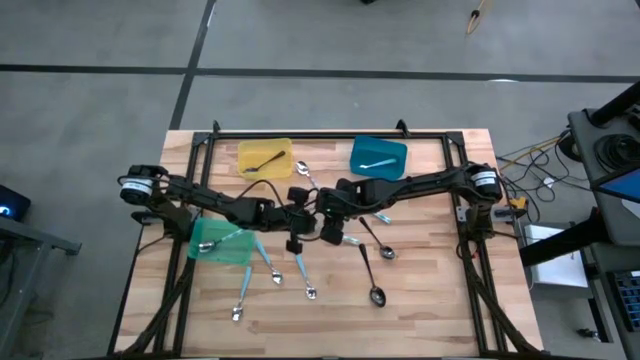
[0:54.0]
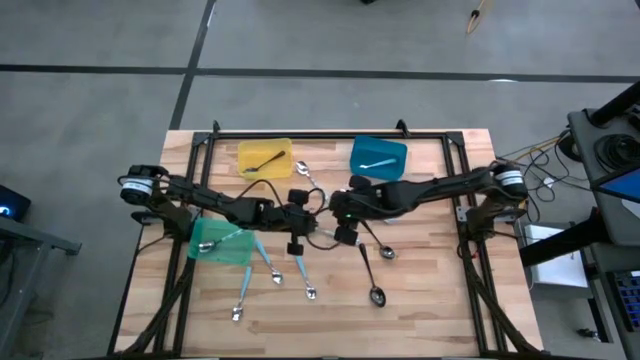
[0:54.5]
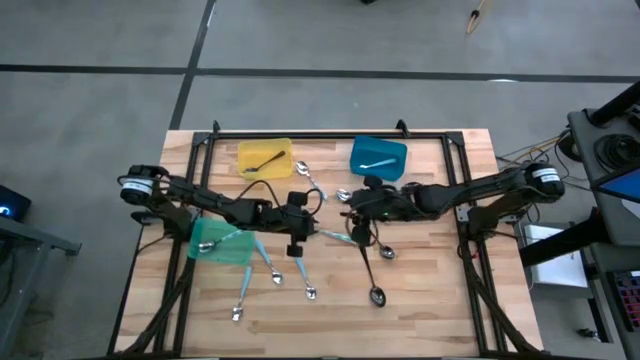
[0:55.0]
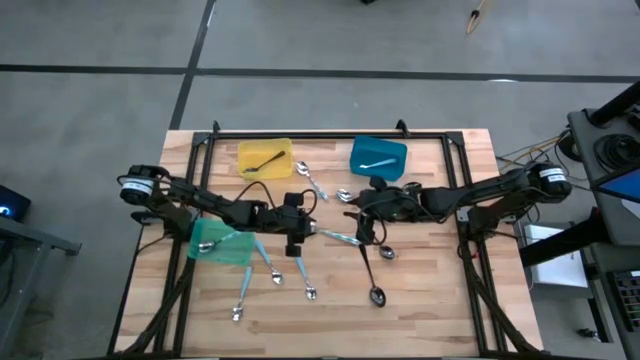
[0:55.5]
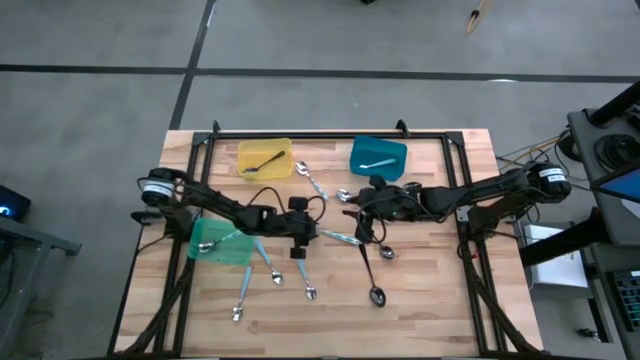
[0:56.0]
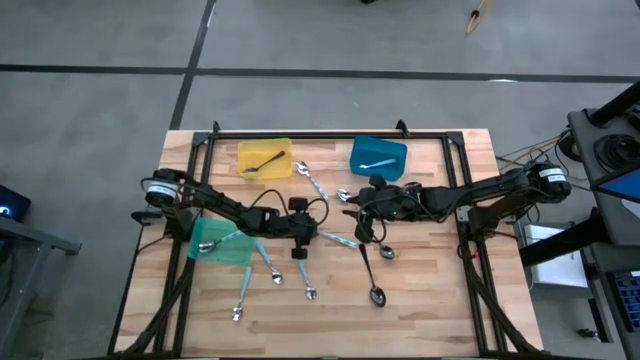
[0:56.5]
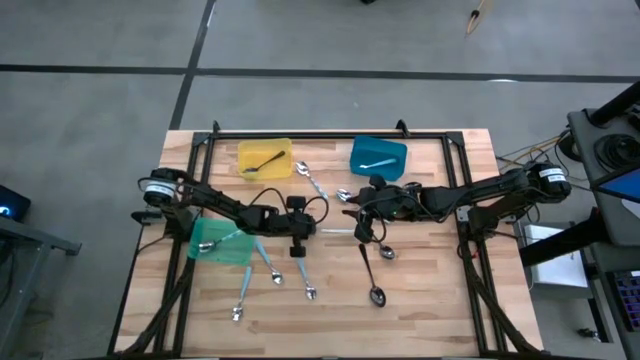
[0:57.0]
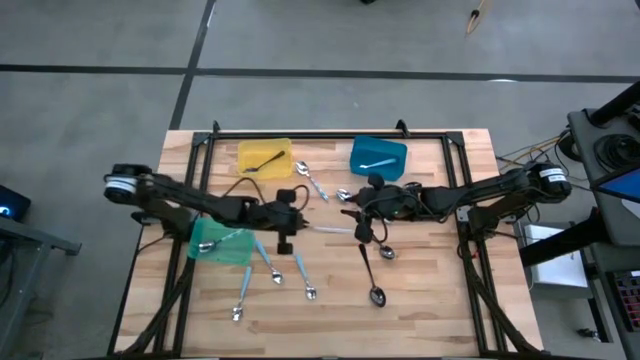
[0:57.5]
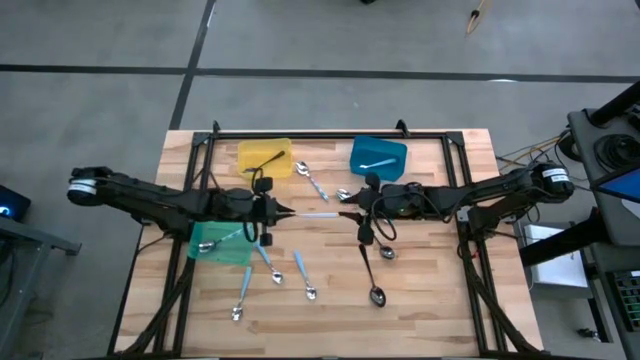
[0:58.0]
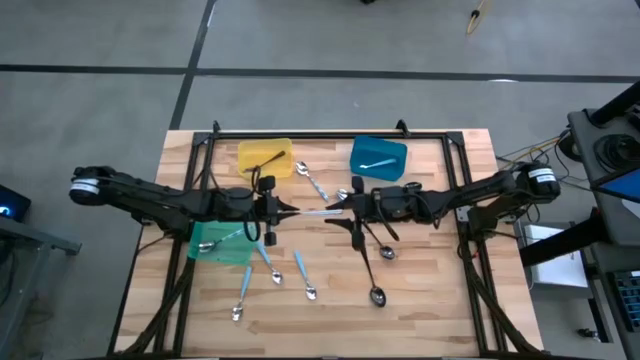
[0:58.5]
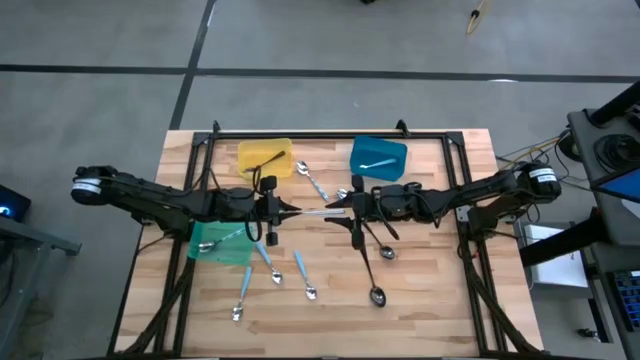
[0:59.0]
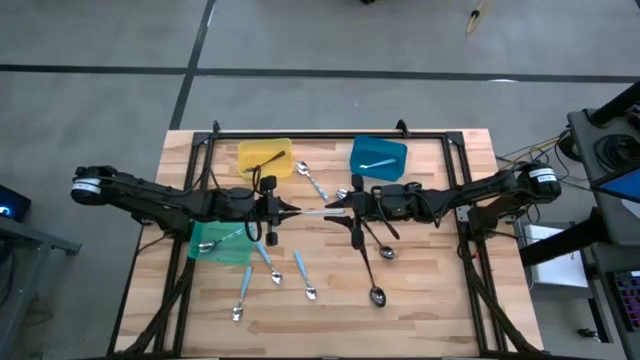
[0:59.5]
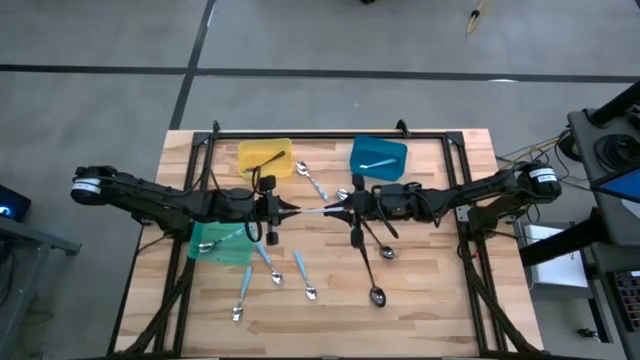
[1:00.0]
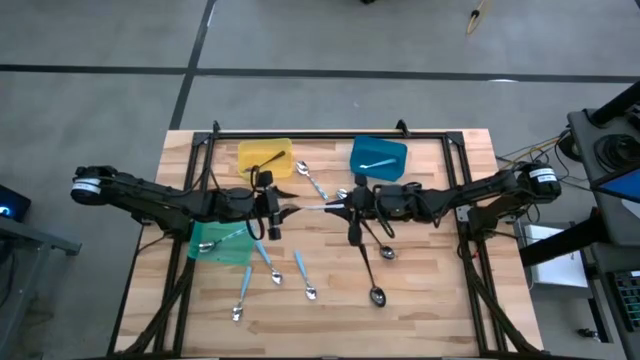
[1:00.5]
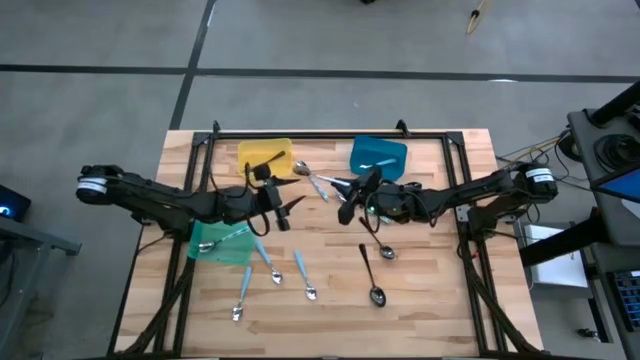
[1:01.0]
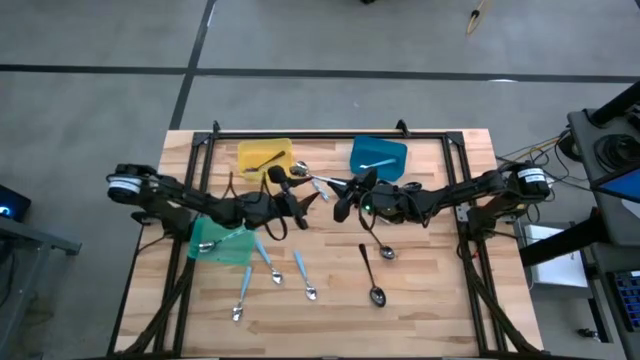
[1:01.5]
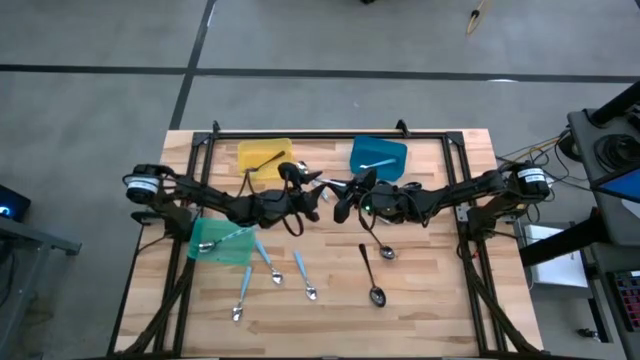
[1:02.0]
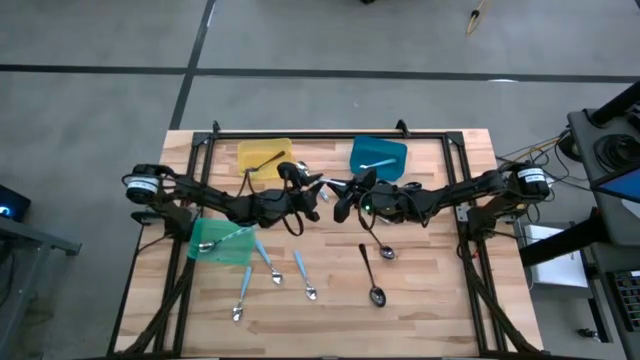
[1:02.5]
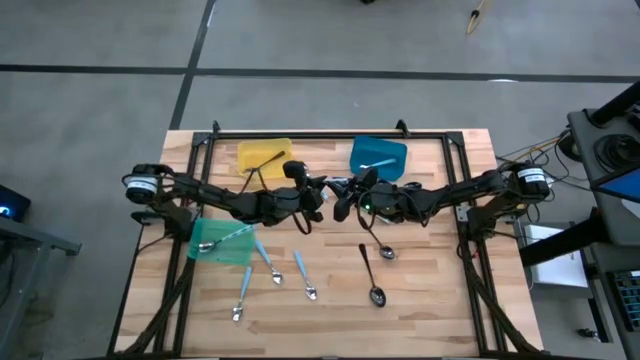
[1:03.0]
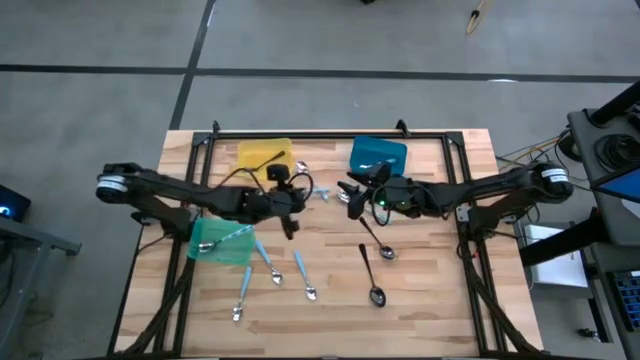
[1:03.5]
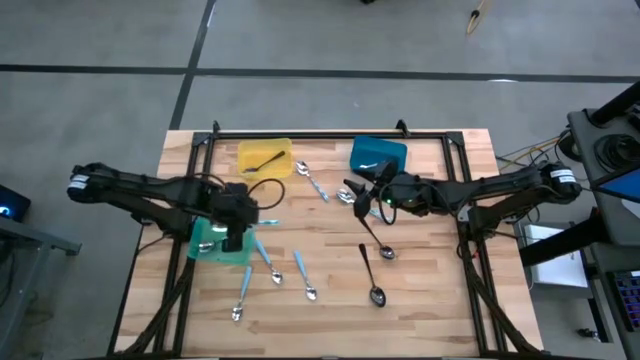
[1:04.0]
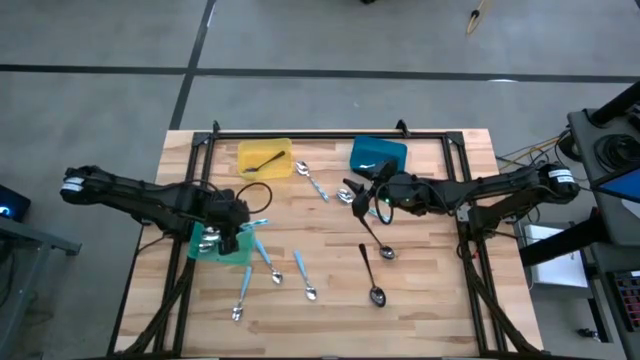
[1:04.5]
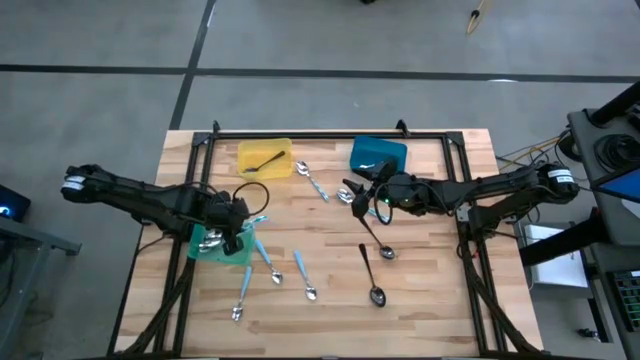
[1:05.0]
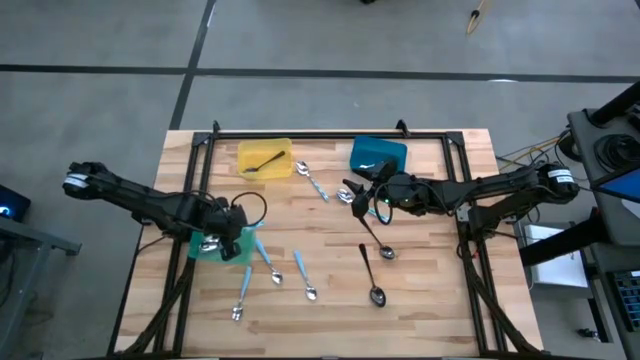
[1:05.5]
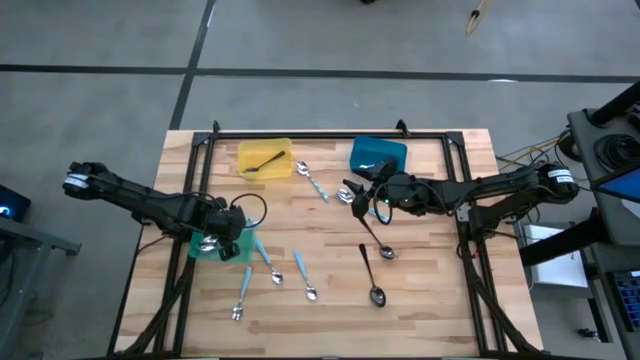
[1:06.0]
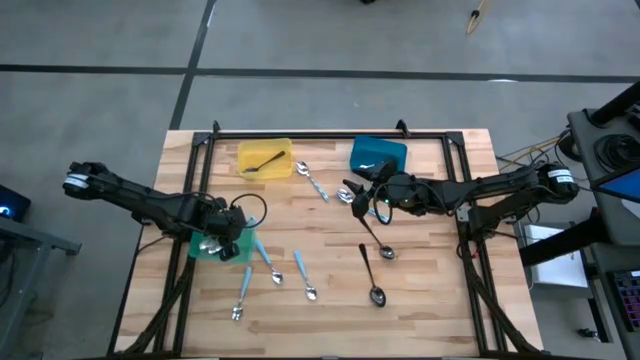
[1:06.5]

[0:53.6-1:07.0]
Task: Sort silverware by color (type)
Put the blue patterned spoon into the green bin

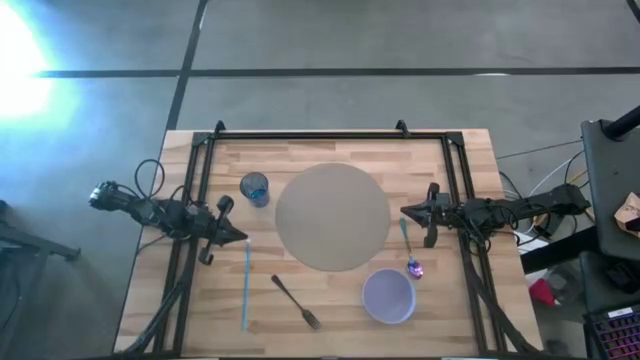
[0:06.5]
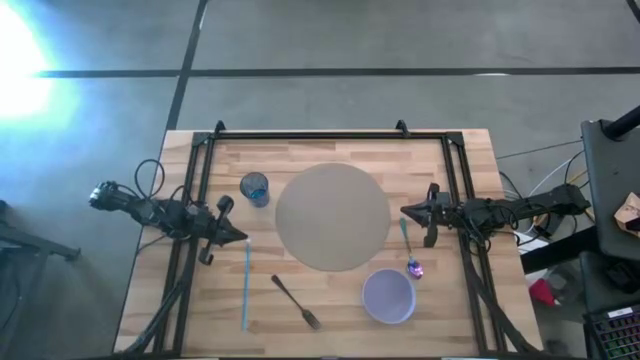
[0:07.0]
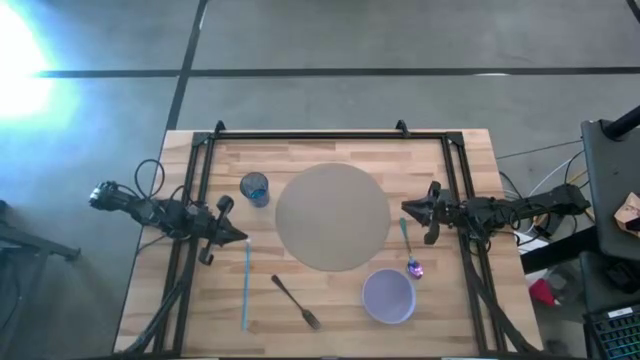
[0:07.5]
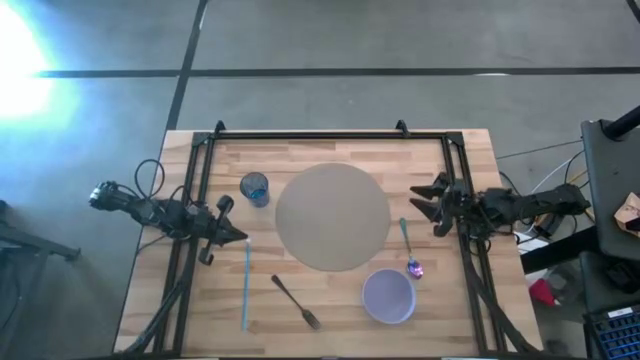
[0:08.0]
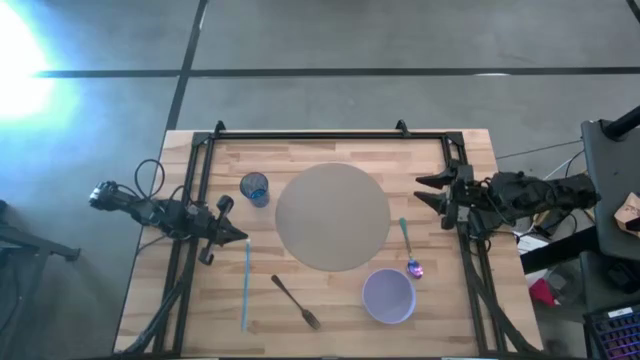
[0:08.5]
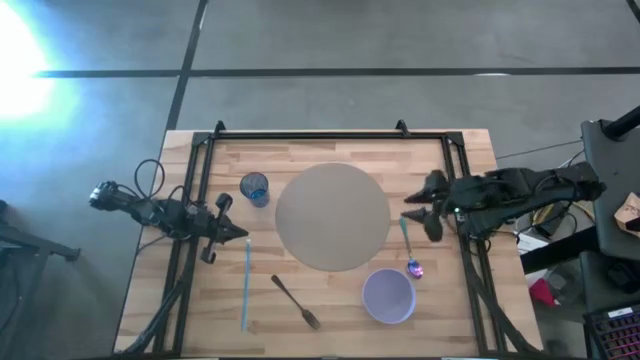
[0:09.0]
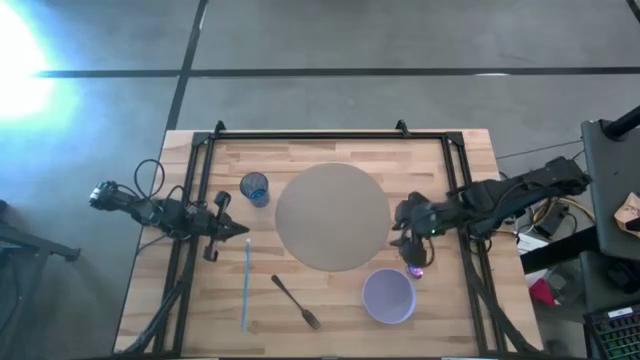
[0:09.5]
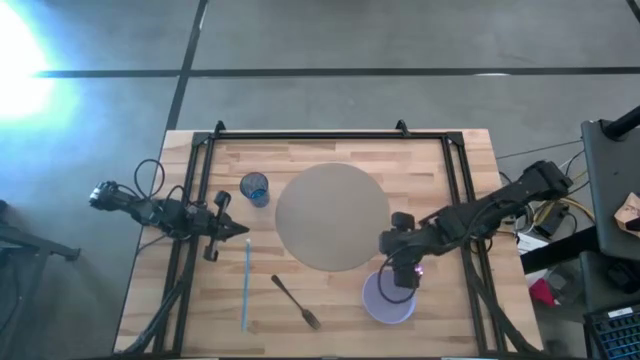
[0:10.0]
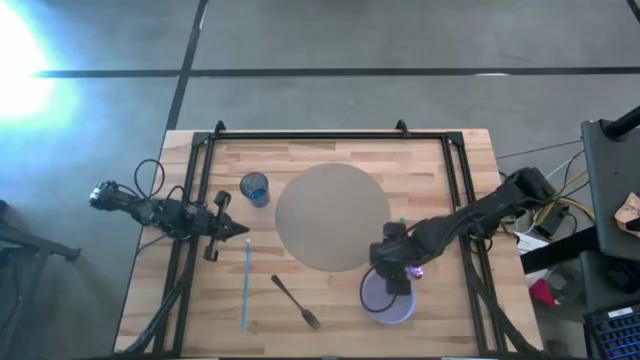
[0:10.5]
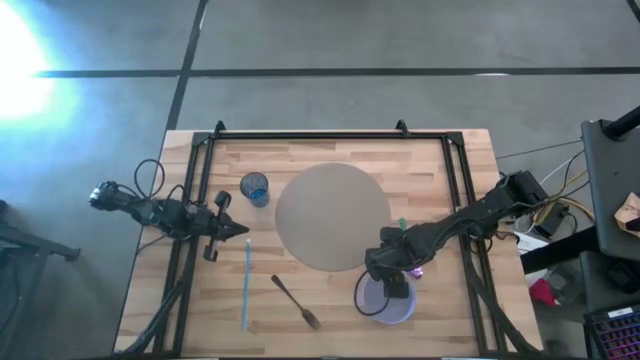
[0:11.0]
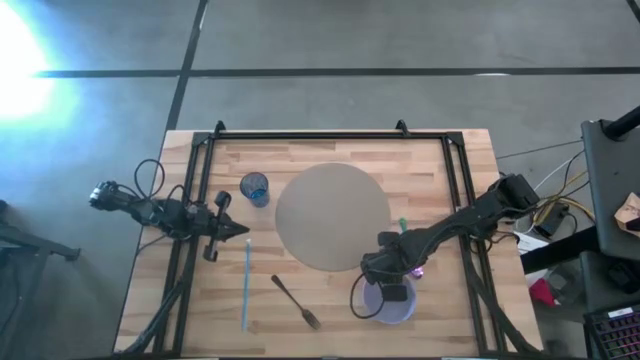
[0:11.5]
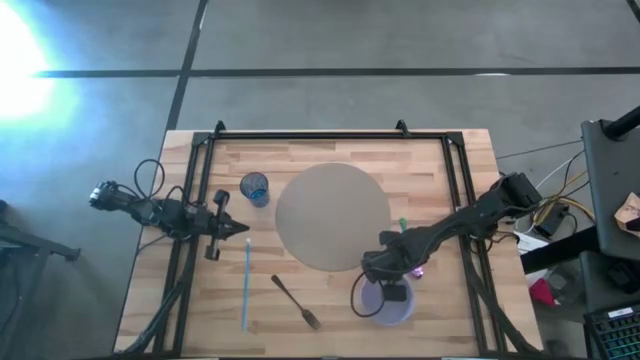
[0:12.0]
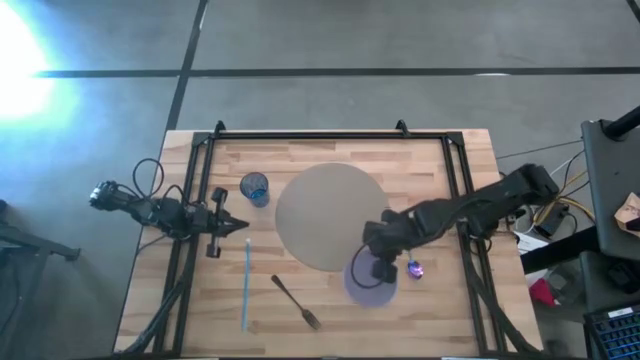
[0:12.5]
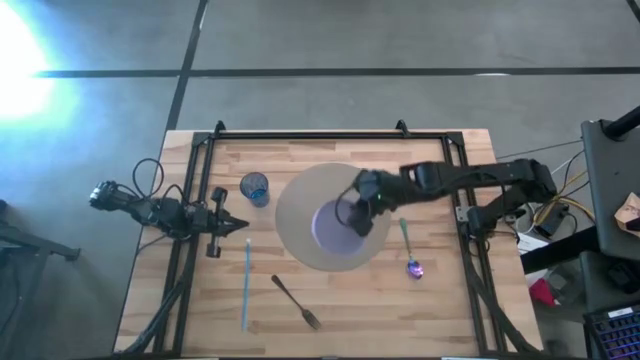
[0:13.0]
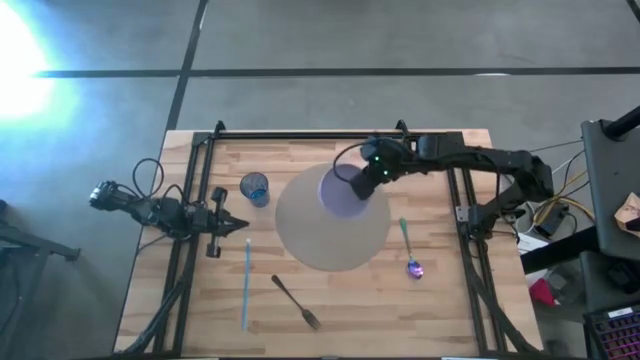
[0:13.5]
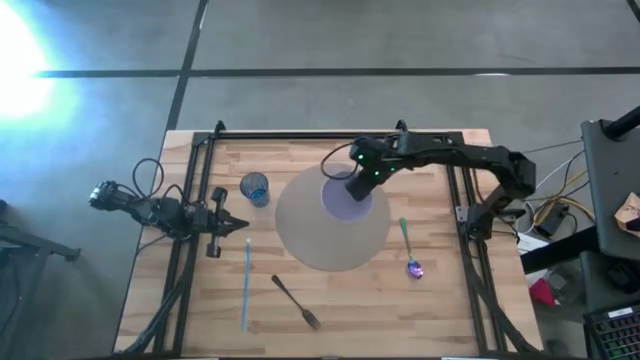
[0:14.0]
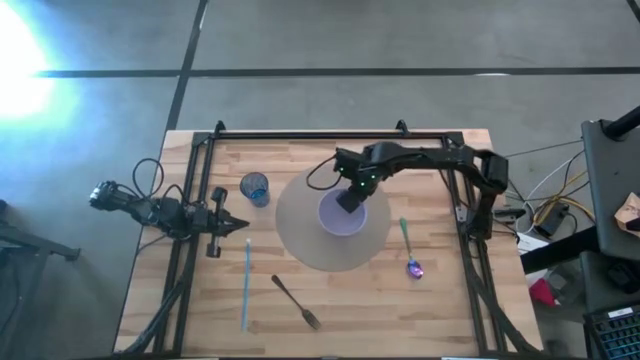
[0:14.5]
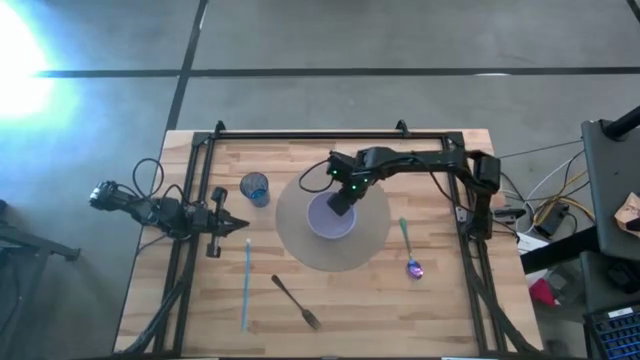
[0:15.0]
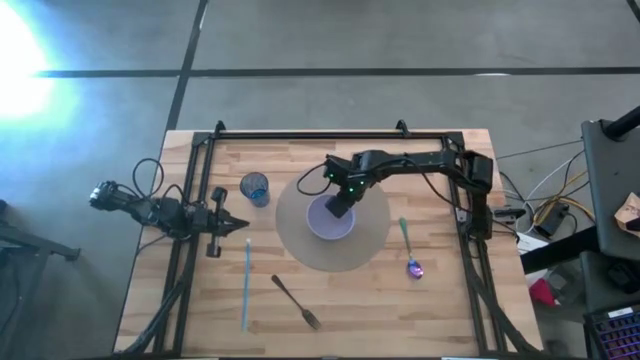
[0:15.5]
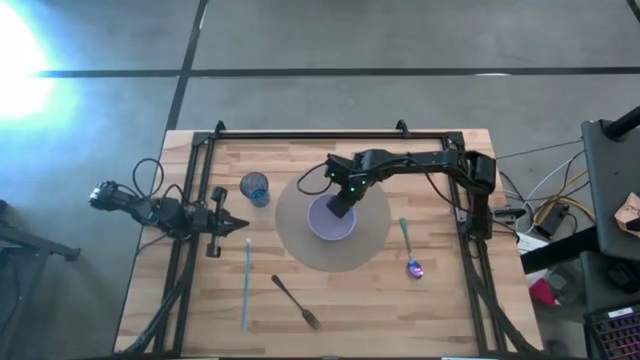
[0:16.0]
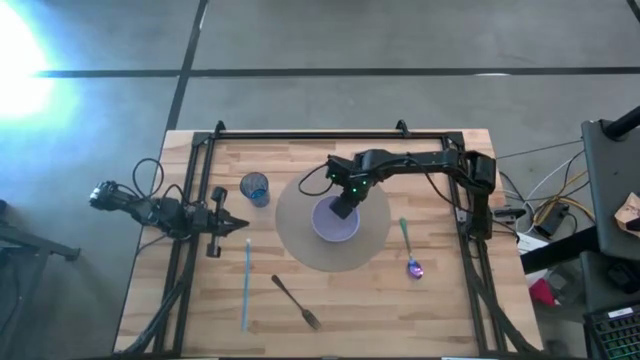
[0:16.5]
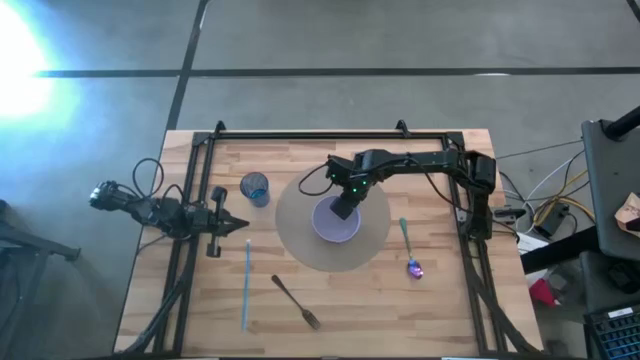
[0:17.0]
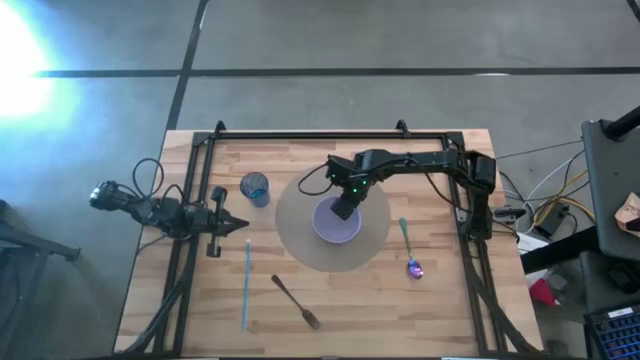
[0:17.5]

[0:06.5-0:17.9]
Task: Pick & Place Utensil
Put the purple bowl on the gray table mat
